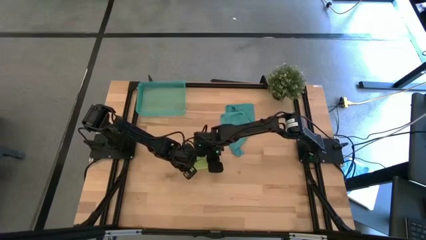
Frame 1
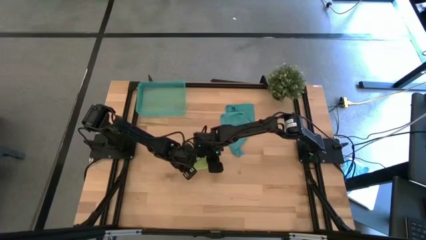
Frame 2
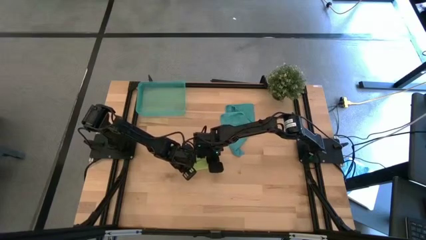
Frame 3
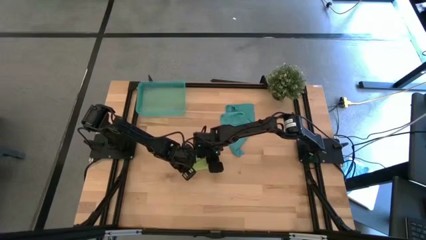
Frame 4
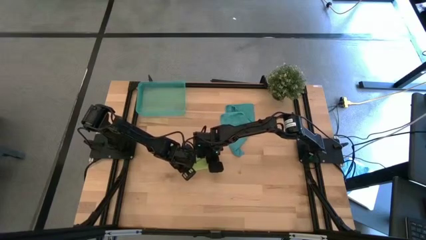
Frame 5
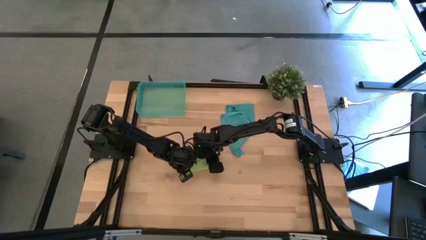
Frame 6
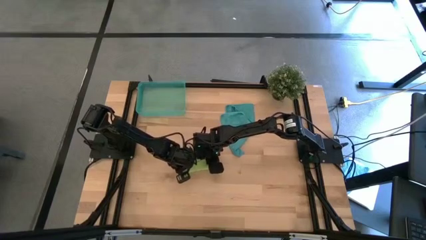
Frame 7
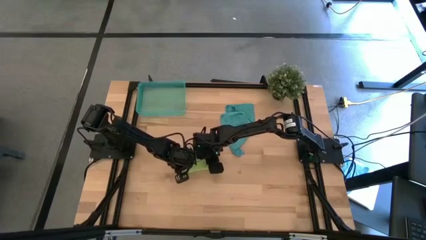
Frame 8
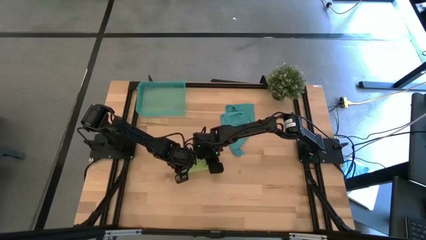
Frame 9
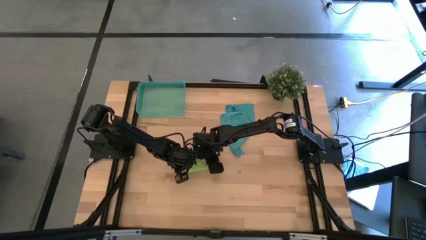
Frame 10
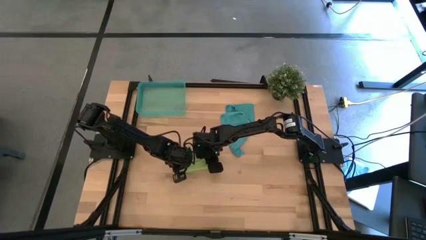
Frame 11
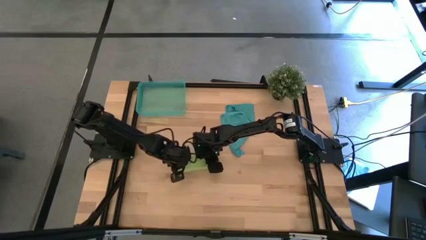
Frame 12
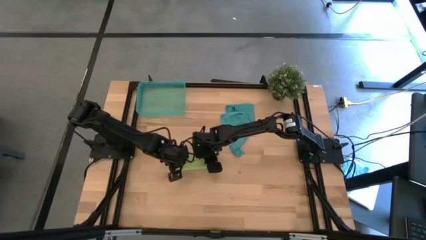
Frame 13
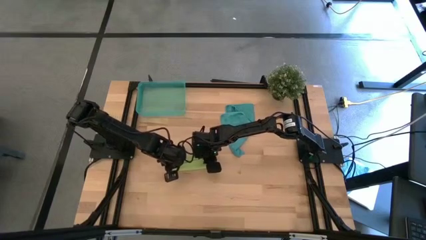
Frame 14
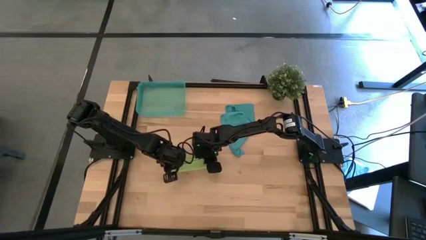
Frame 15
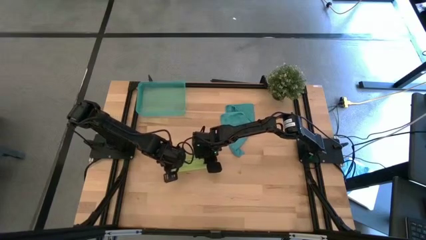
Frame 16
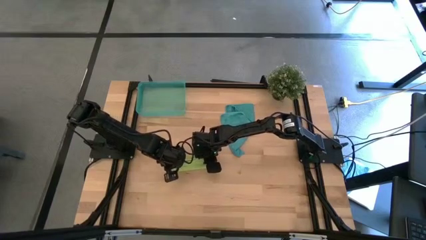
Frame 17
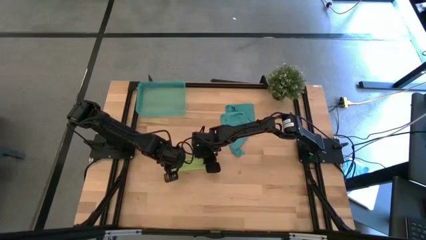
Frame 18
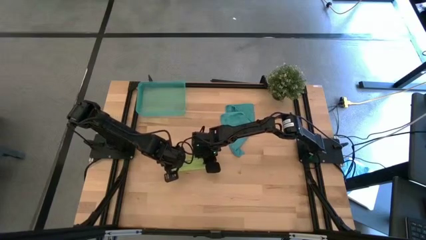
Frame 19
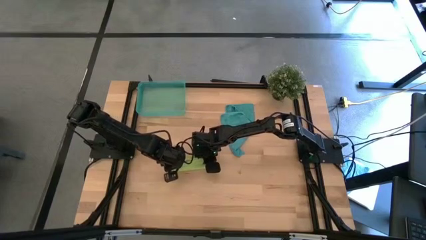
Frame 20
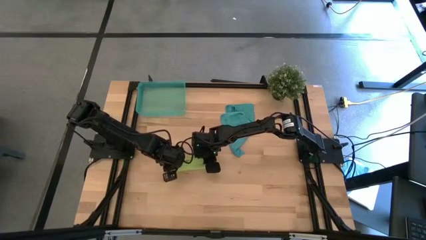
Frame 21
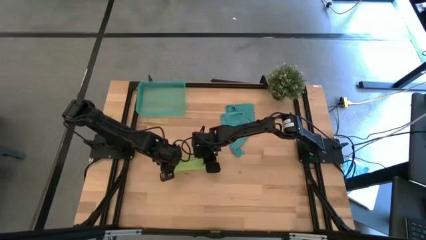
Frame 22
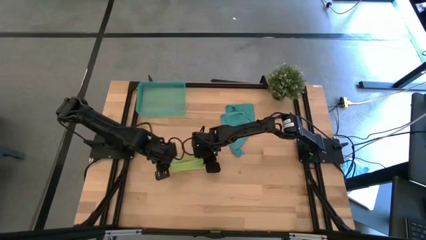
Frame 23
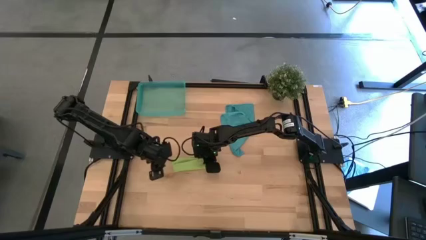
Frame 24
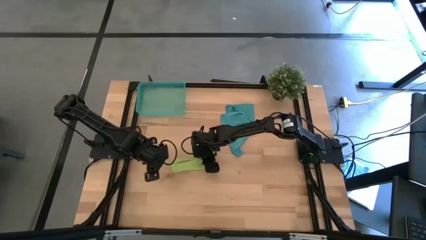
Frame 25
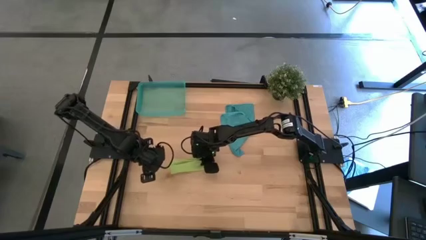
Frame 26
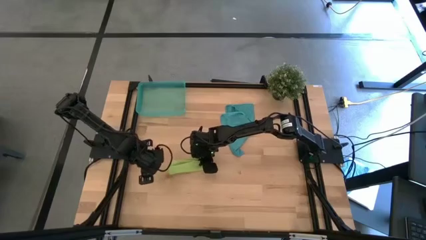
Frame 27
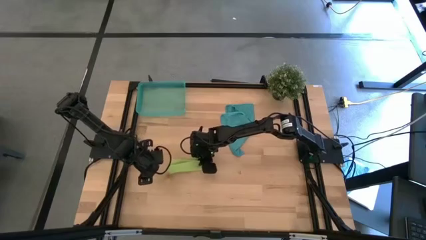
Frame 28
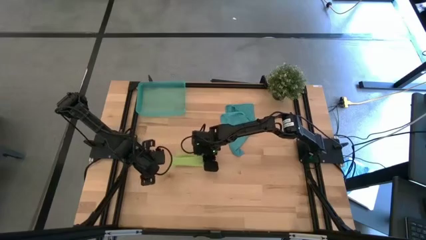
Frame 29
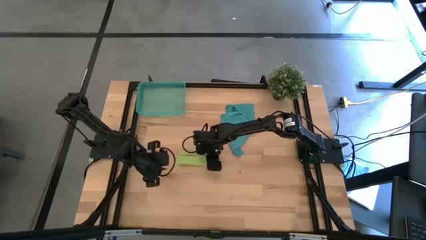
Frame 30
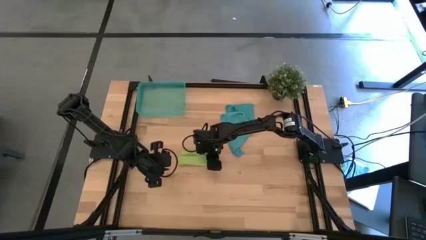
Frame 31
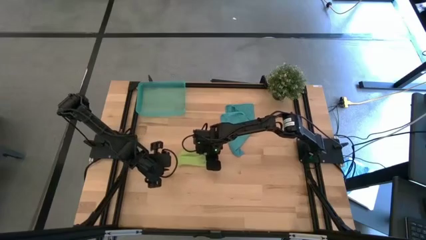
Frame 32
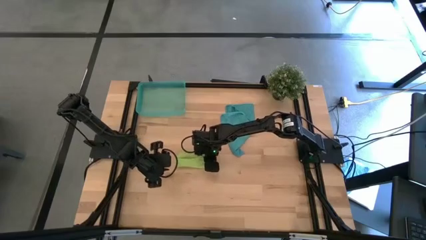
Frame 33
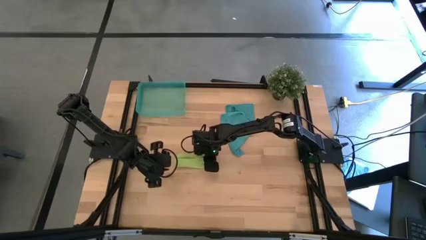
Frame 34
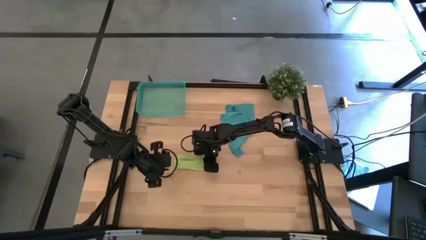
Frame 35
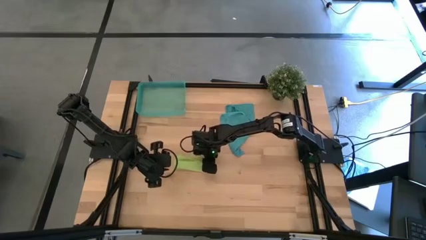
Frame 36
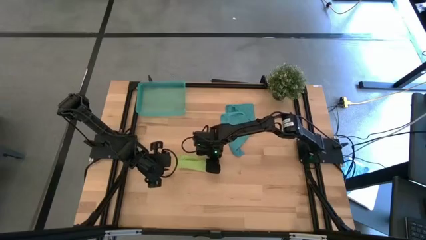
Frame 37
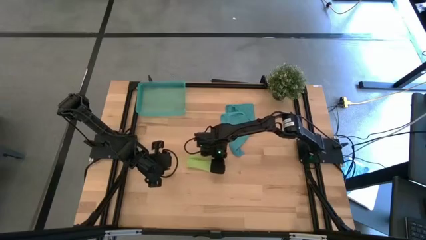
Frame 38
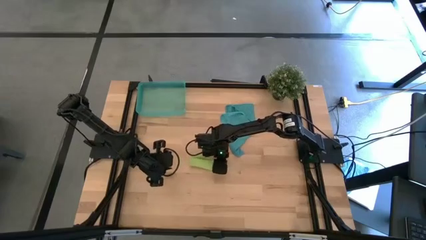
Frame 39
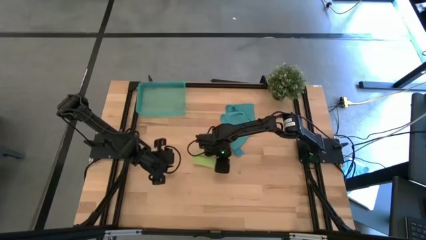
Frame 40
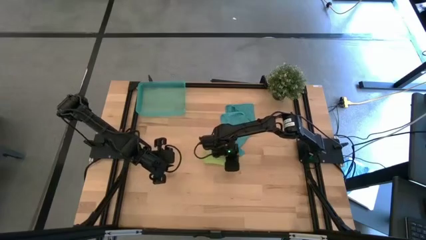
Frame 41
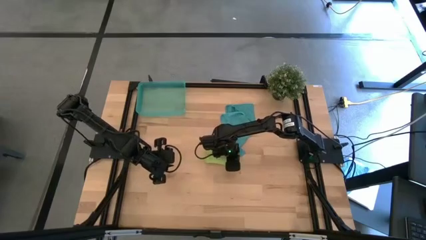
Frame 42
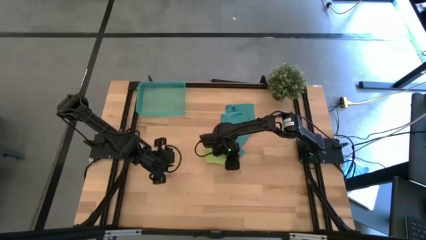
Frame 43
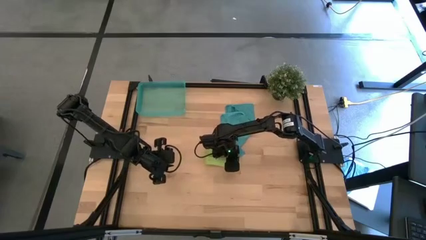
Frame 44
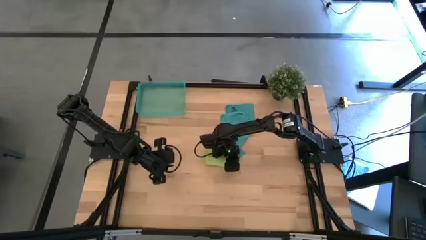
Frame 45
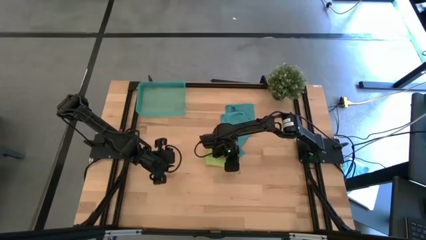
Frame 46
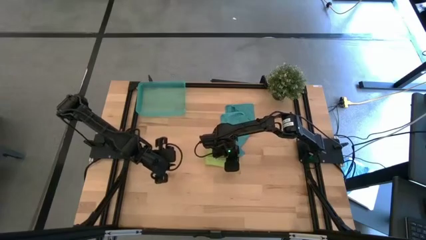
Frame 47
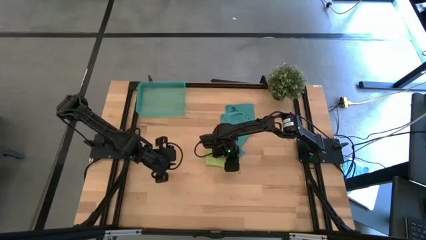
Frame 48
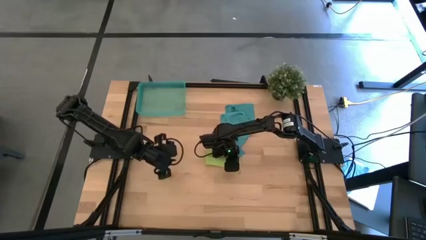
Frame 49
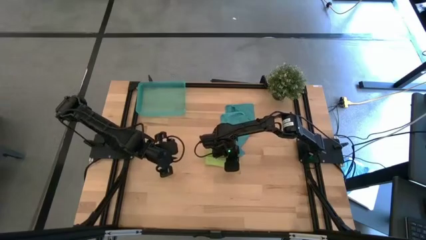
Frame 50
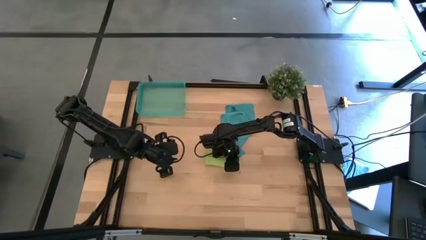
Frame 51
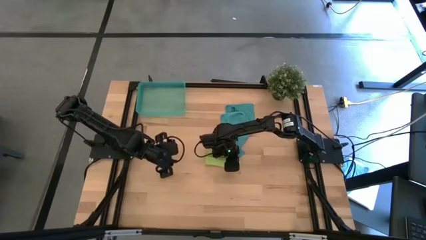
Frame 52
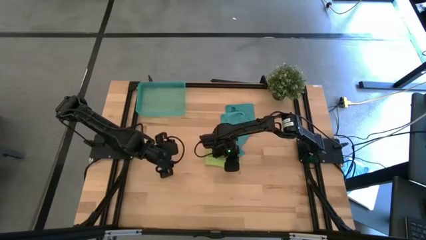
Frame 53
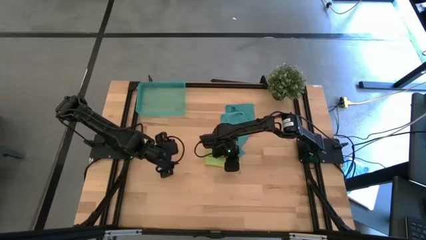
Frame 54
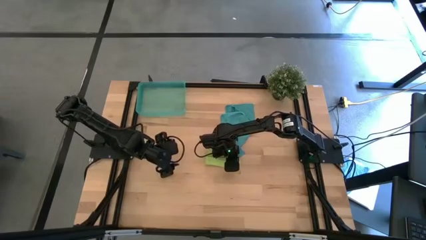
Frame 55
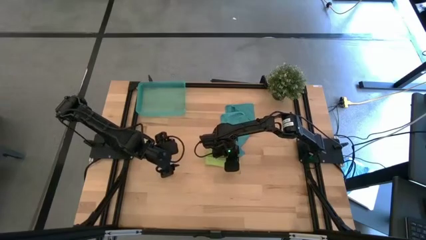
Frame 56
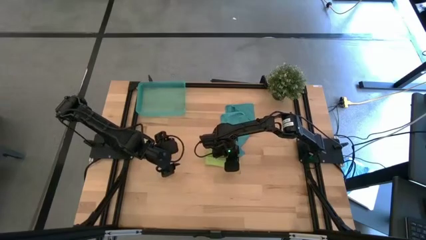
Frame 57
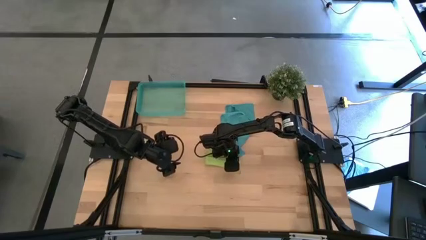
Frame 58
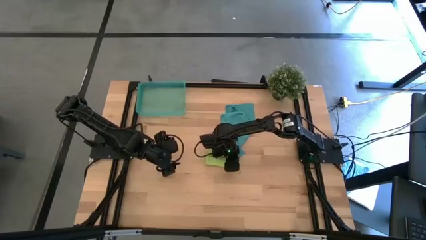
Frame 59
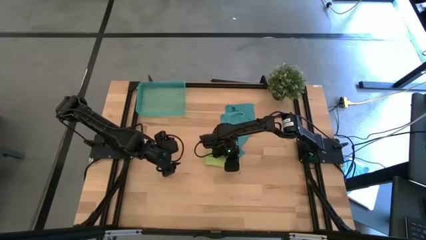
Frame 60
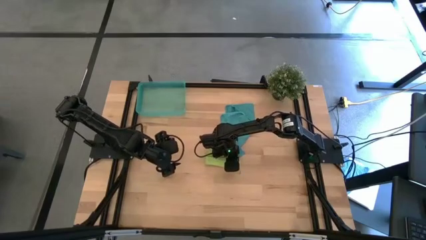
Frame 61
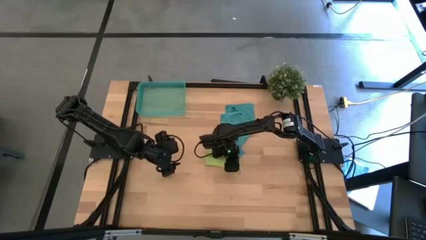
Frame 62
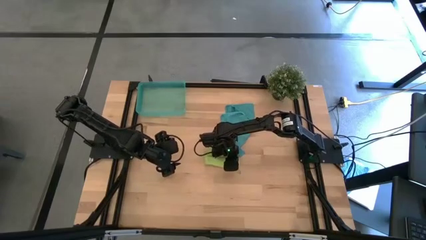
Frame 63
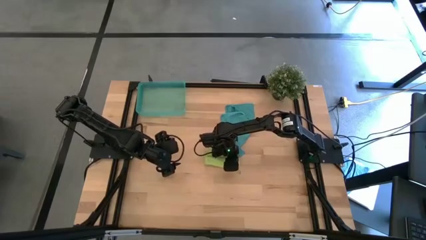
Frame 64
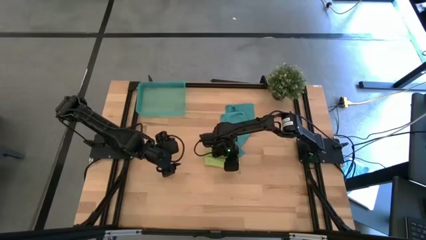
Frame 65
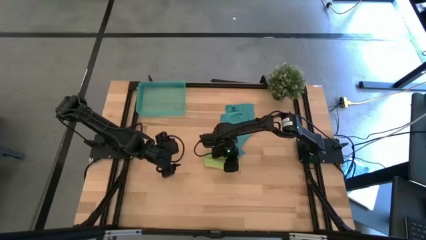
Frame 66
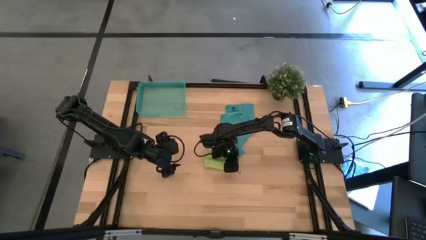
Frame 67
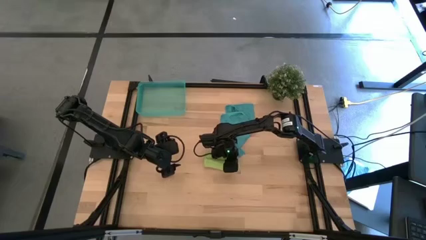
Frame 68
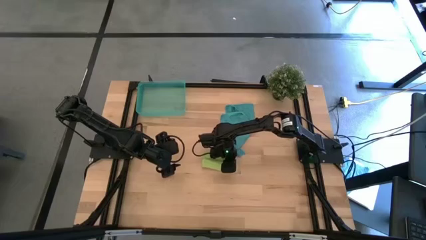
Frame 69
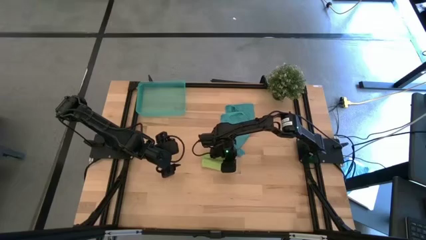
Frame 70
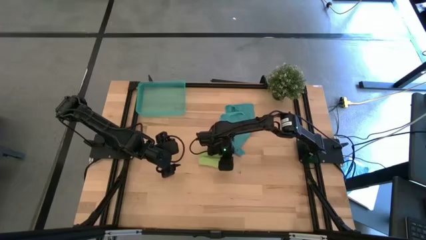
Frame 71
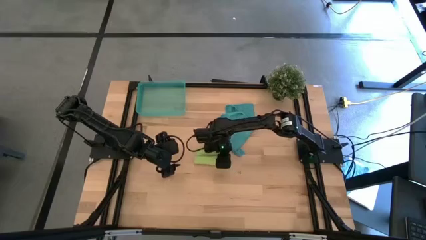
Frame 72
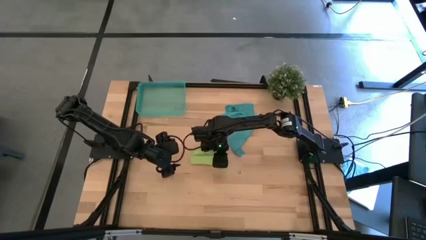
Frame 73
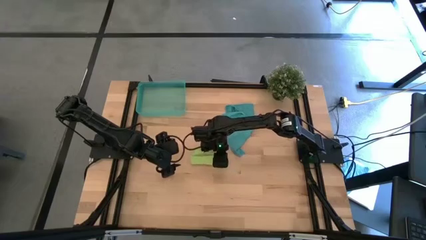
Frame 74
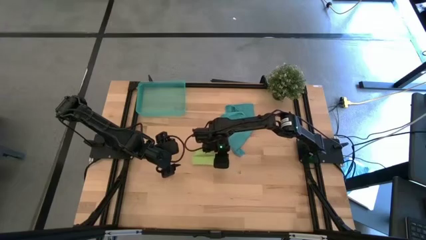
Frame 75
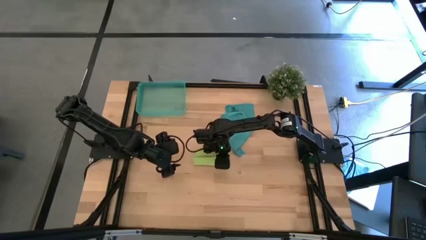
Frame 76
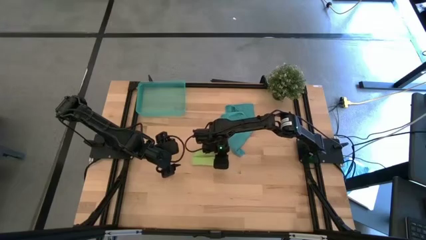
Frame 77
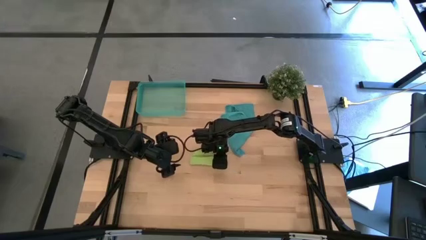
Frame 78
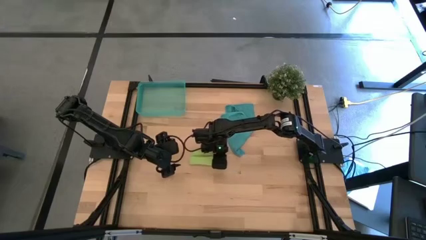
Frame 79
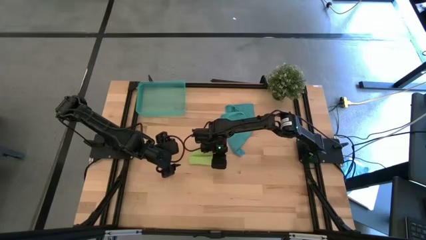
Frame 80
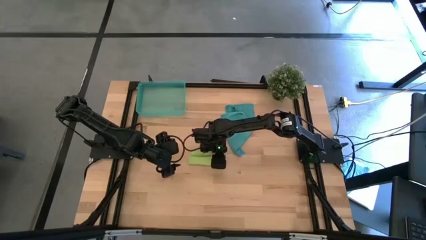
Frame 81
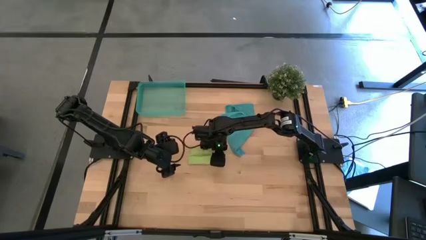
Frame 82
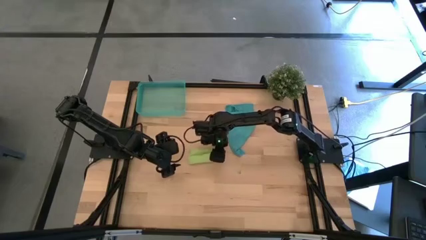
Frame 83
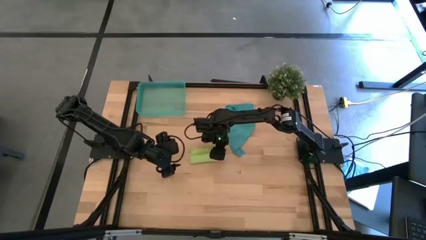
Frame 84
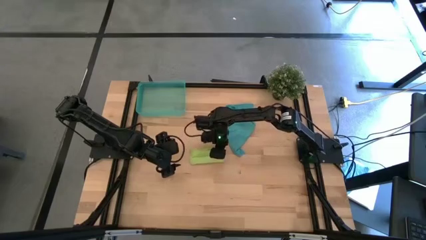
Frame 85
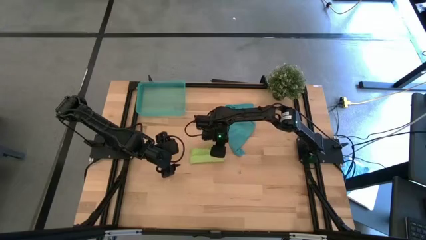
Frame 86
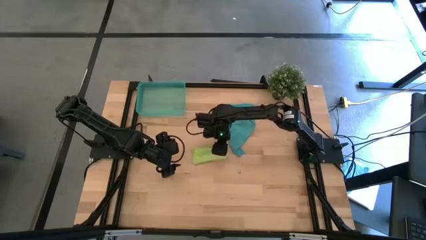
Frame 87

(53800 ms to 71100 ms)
Task: Roll microfiber towels into tight, uniform cylinder then place into a basket
Roll the green microfiber cloth
